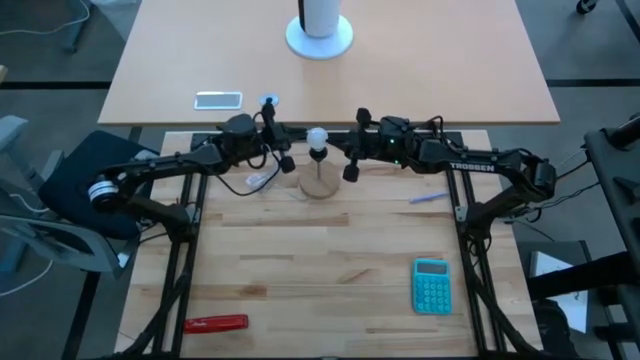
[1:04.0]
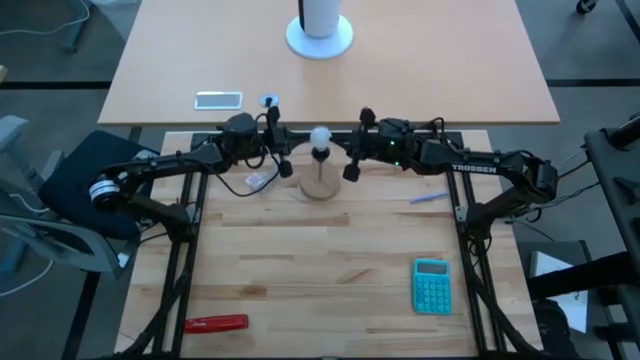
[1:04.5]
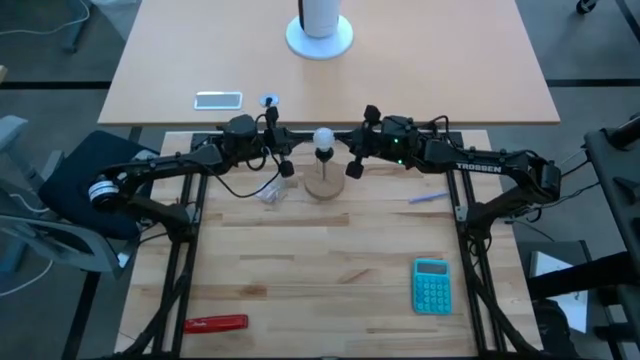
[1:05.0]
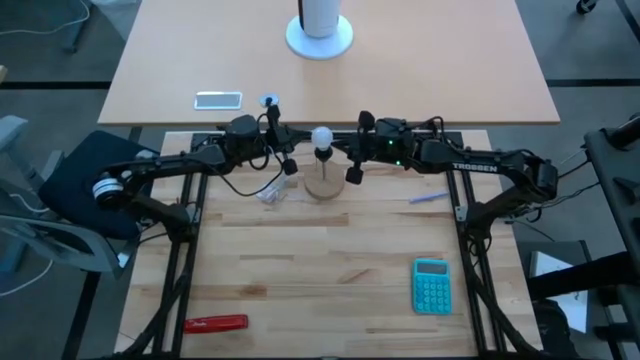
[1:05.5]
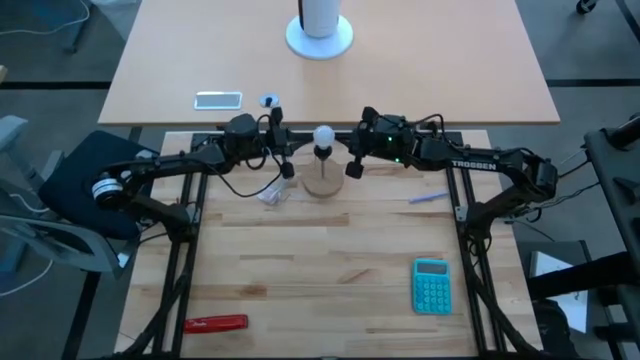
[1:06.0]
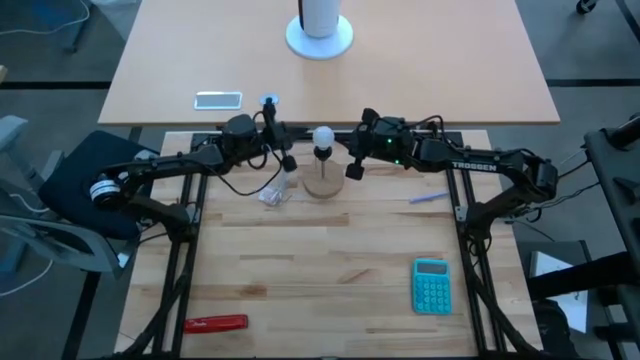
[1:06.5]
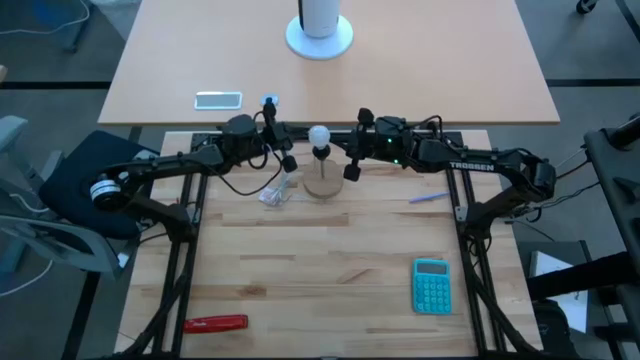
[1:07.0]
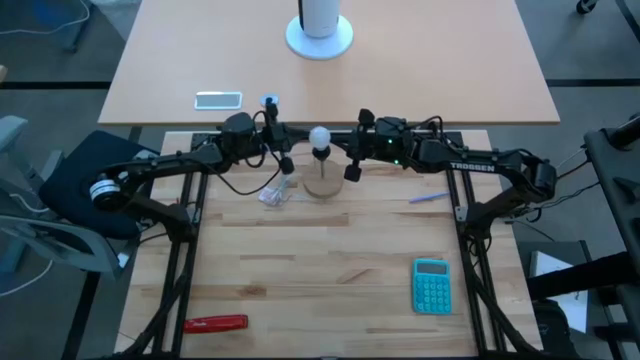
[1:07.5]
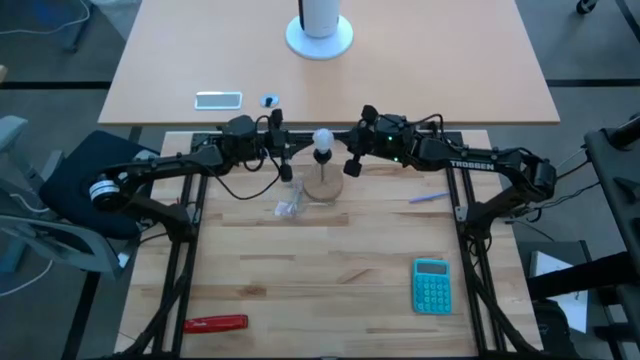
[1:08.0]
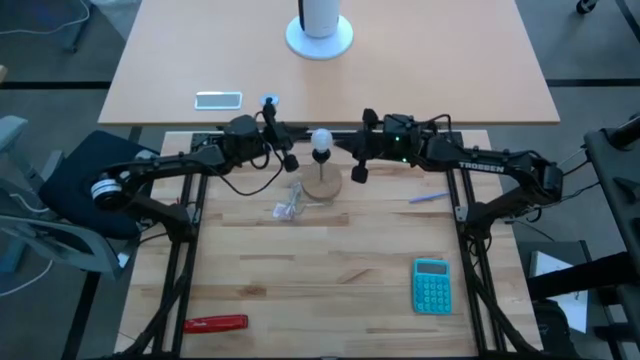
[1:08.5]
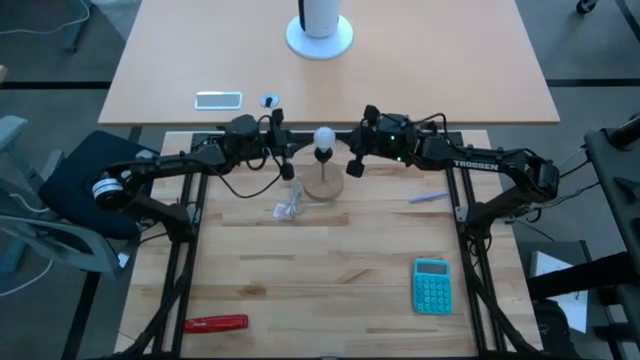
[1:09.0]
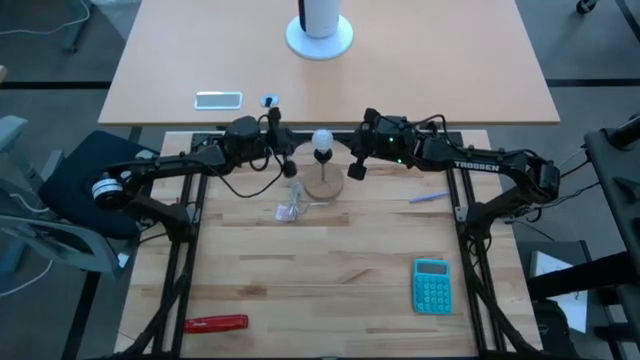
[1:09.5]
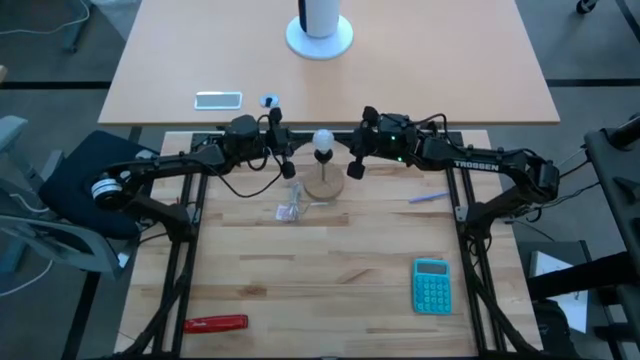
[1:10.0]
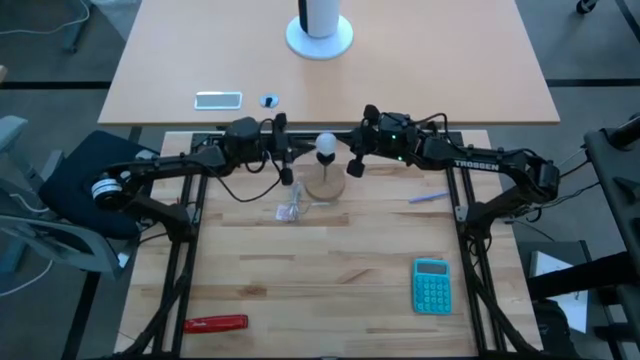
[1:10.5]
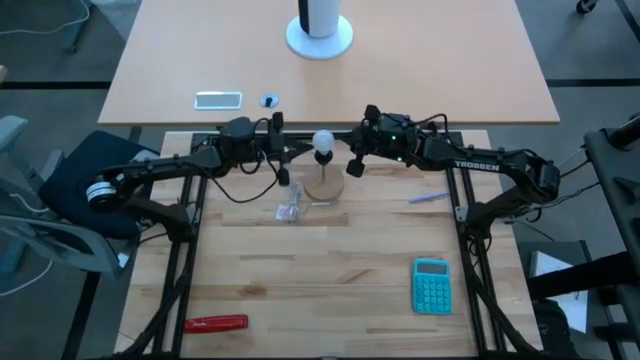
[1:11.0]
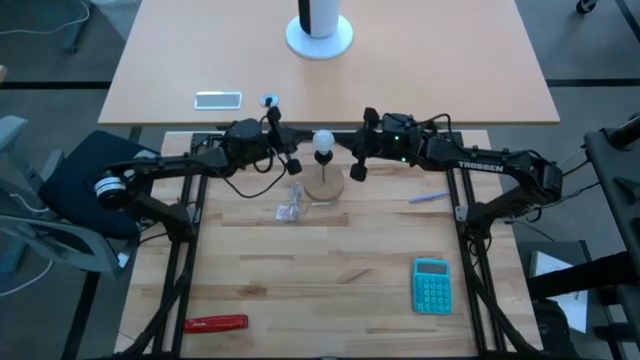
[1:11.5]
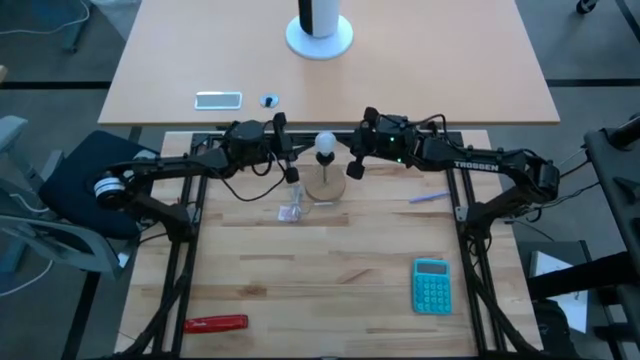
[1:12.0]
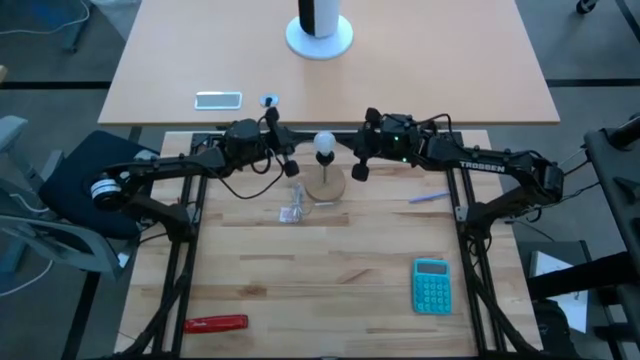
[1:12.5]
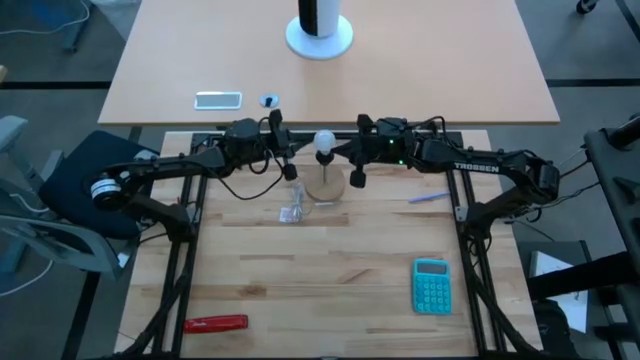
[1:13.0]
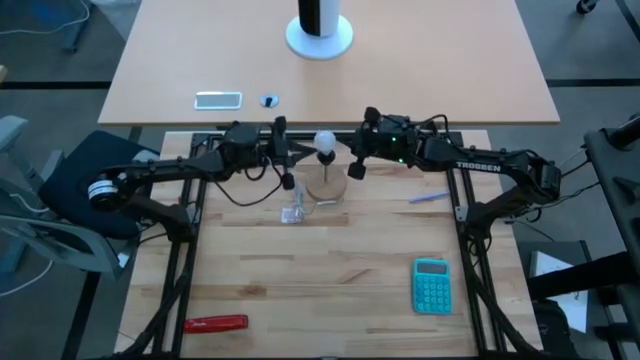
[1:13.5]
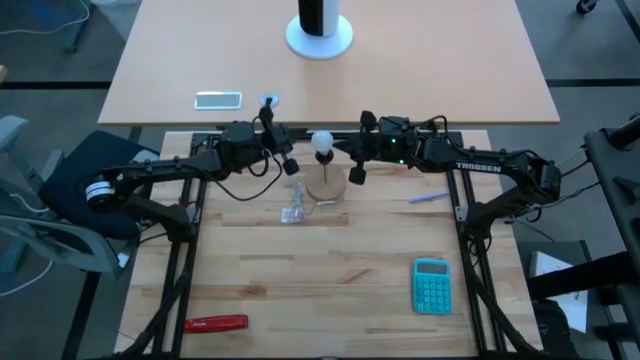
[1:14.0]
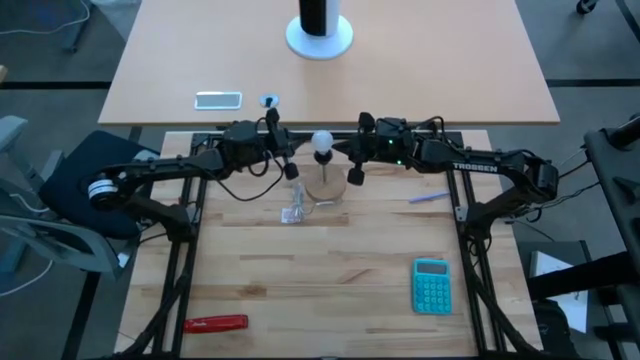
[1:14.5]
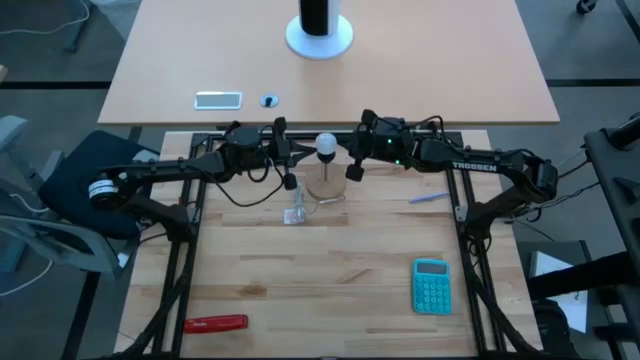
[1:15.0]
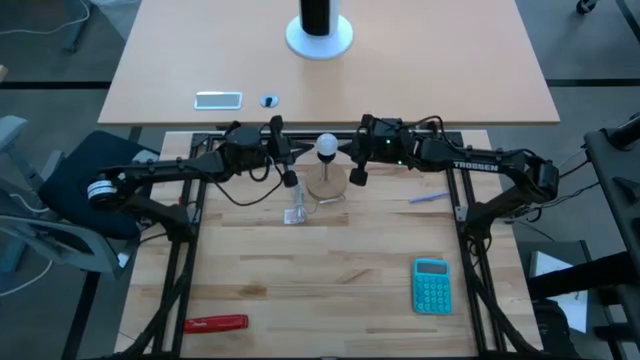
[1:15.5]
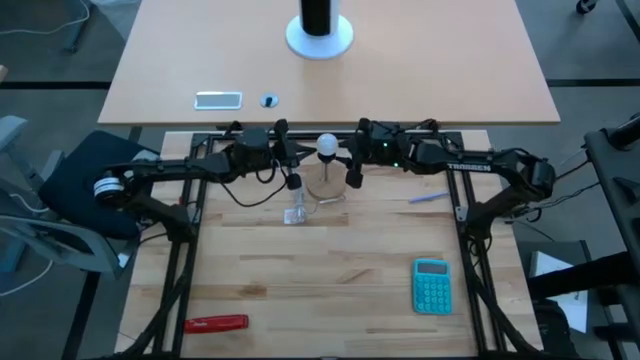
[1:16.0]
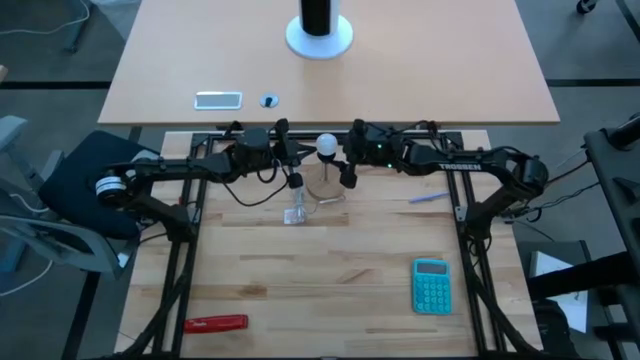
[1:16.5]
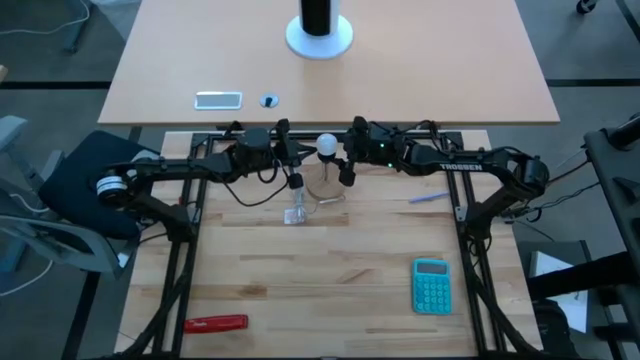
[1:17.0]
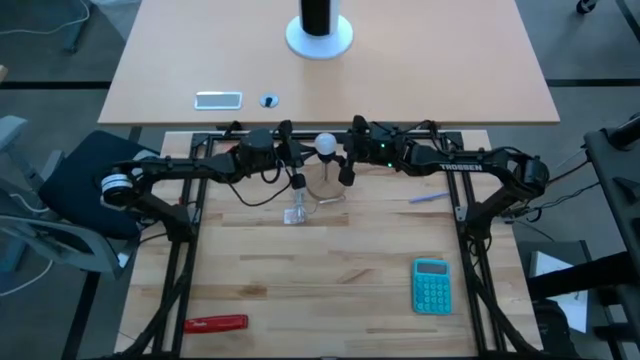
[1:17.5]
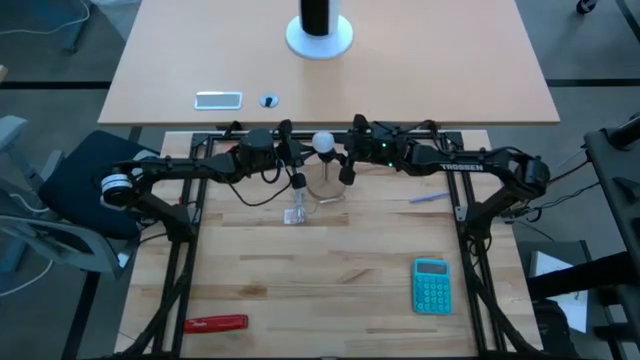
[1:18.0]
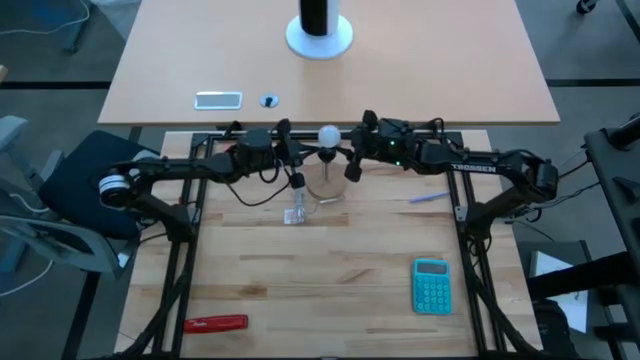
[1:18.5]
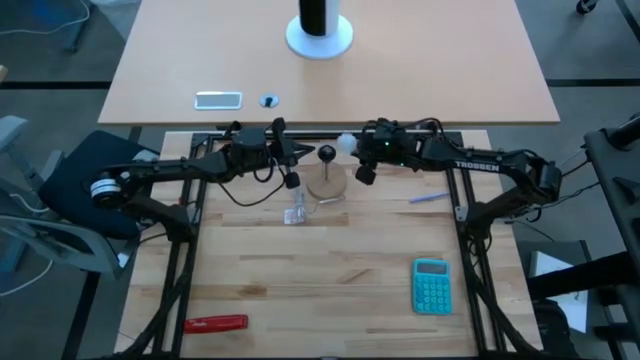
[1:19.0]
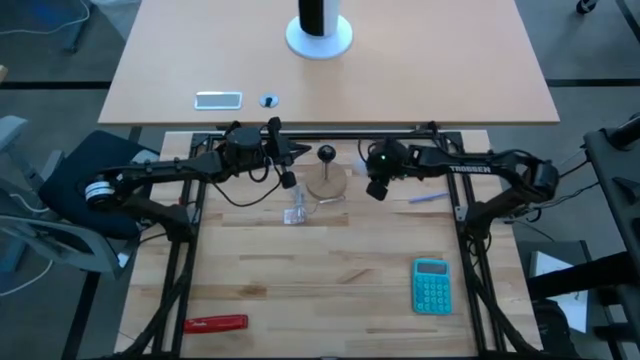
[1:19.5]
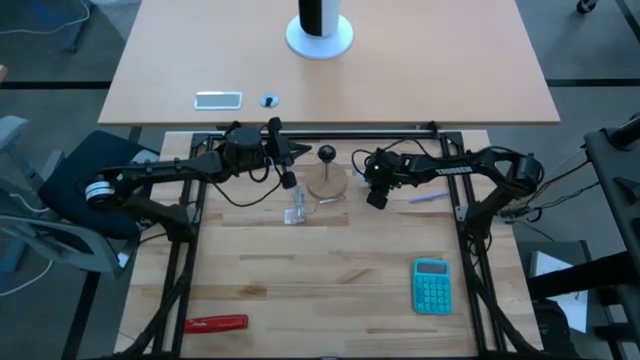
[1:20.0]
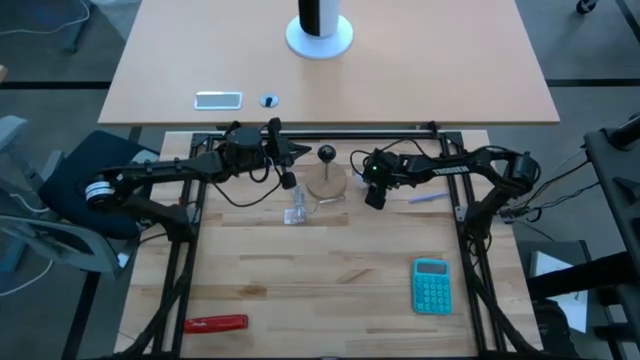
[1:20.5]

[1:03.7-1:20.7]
Task: Screw lightbulb
Remove the light bulb from the bulb socket

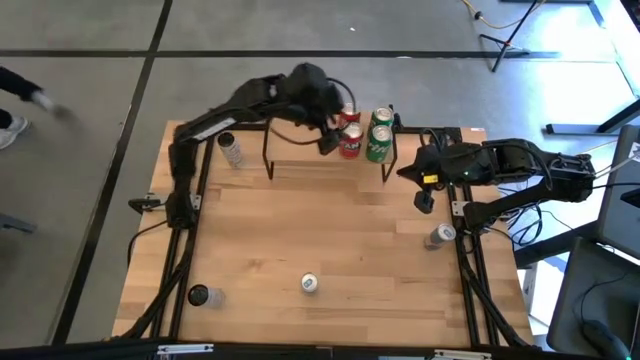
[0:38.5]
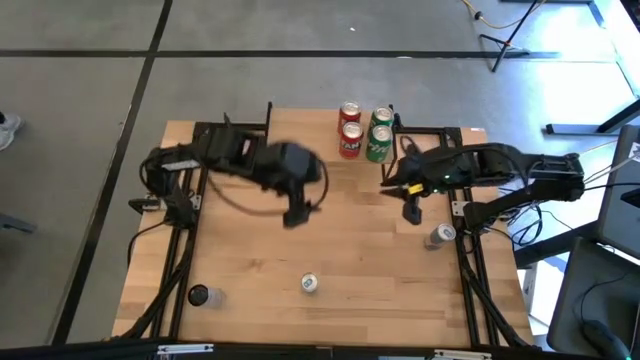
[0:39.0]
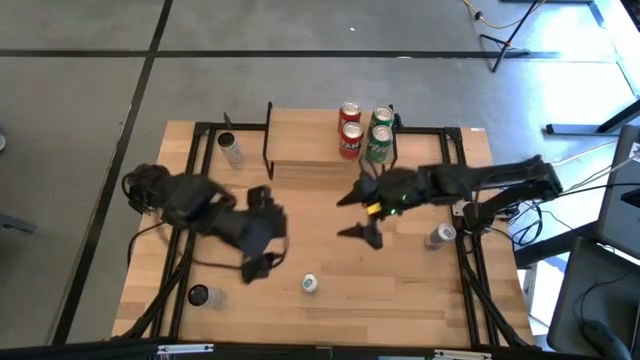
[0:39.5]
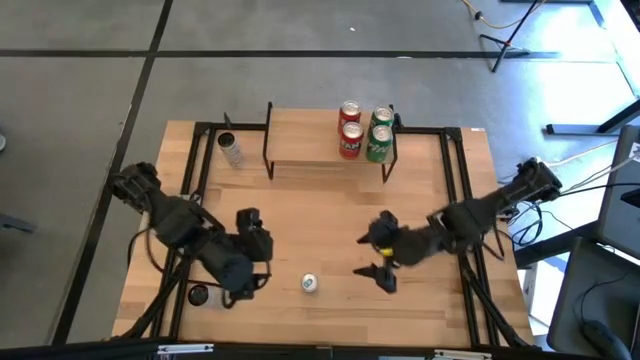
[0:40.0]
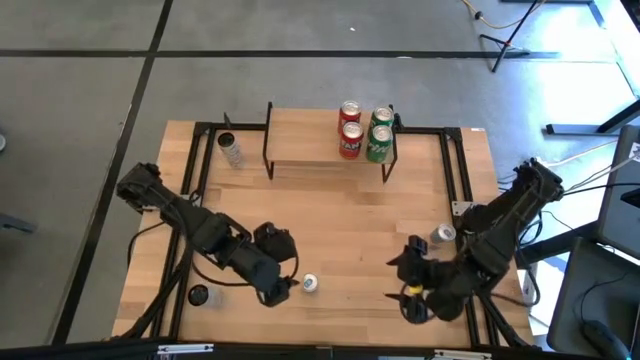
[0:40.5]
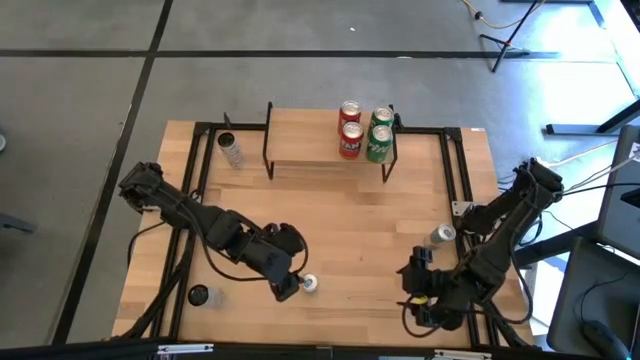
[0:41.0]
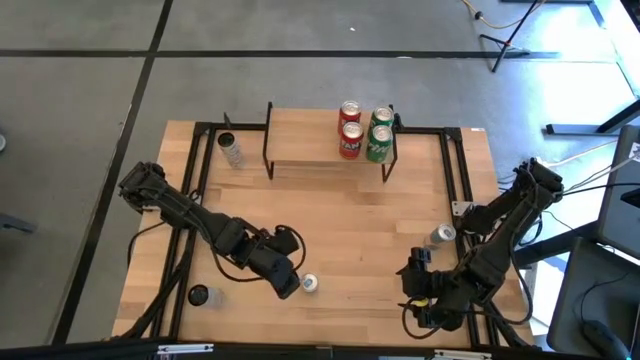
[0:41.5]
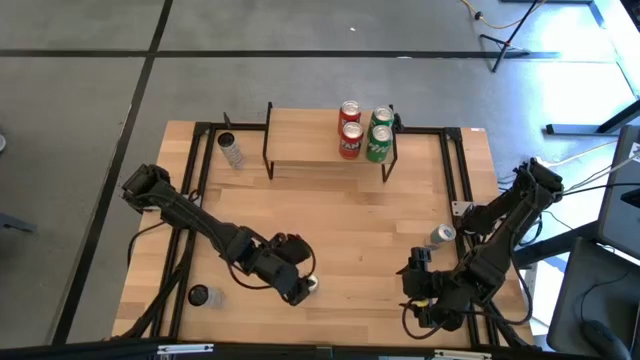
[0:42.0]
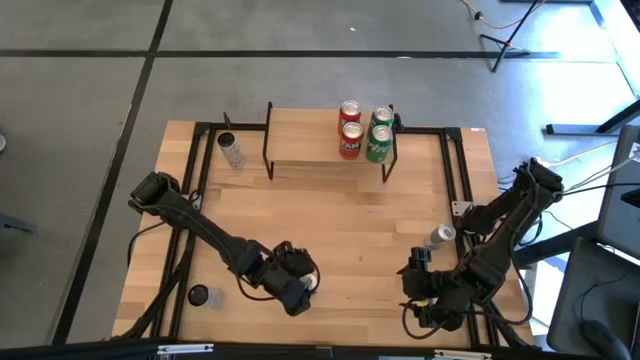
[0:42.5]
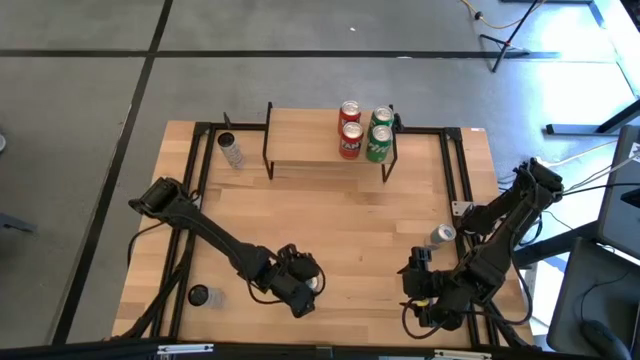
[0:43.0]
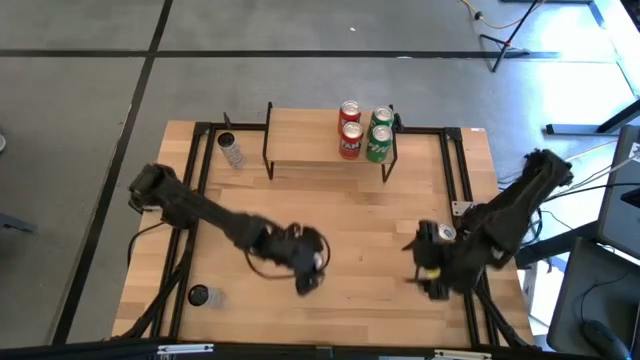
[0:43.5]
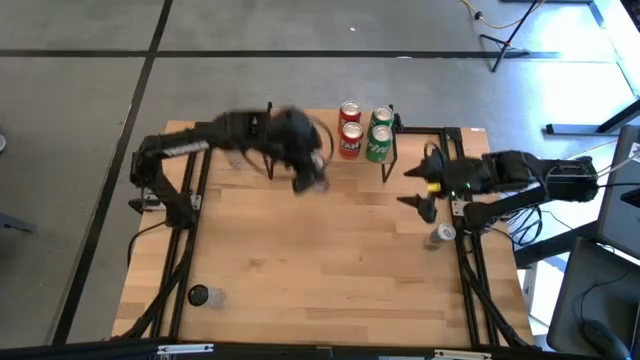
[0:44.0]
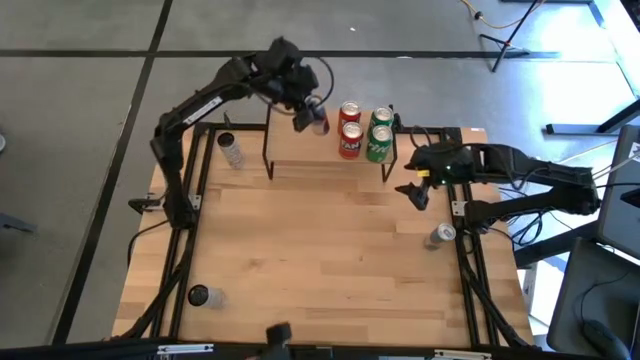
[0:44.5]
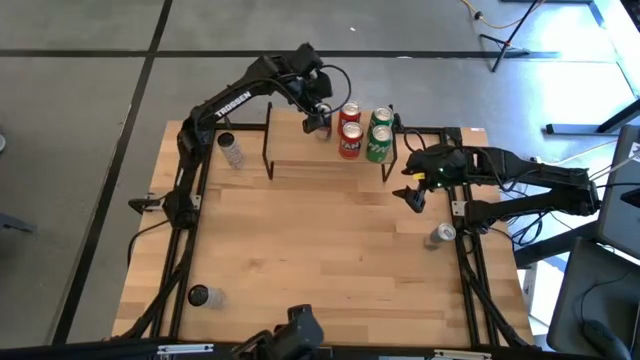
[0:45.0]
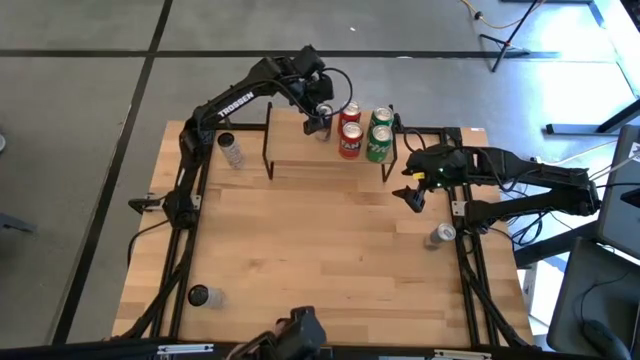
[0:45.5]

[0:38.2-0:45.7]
Task: Place canned beverage on shelf
Put the left blue soda can on the shelf
